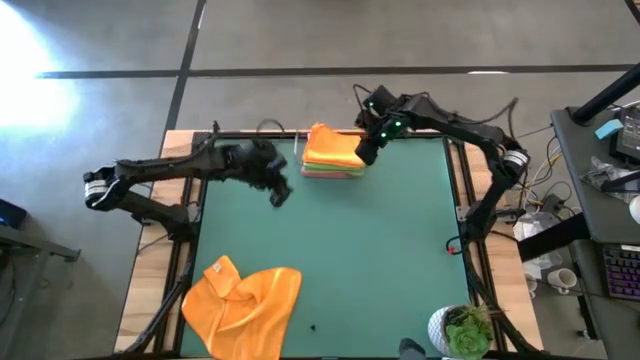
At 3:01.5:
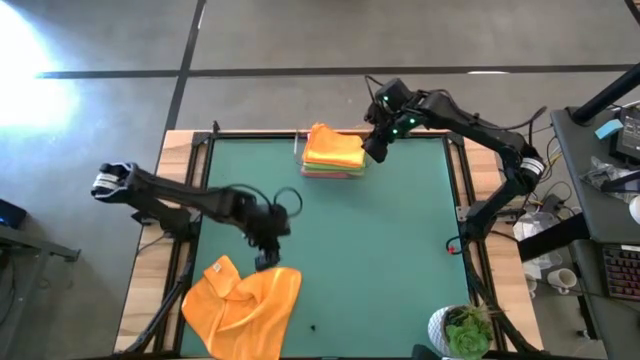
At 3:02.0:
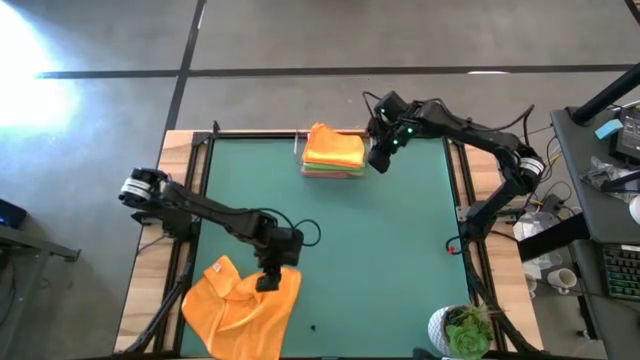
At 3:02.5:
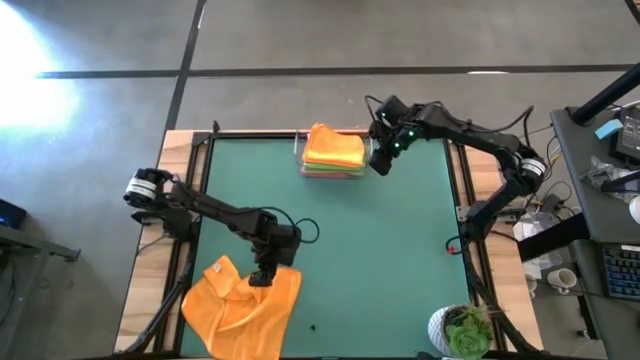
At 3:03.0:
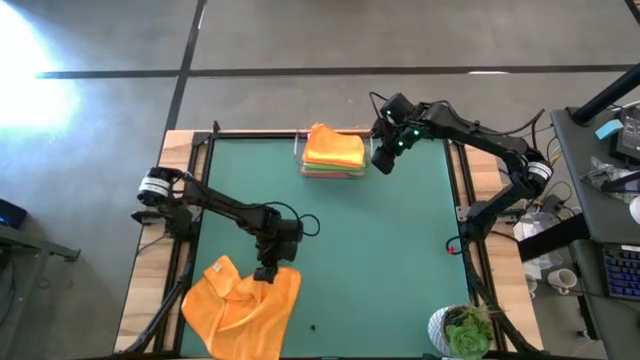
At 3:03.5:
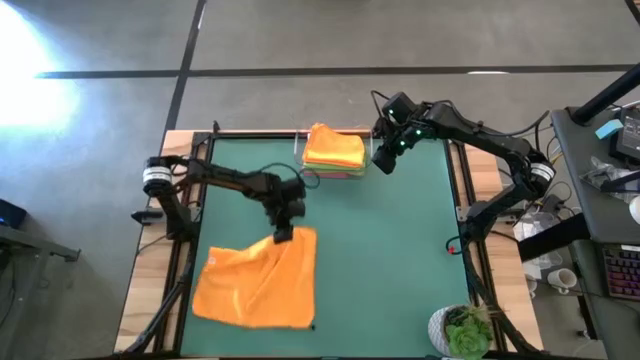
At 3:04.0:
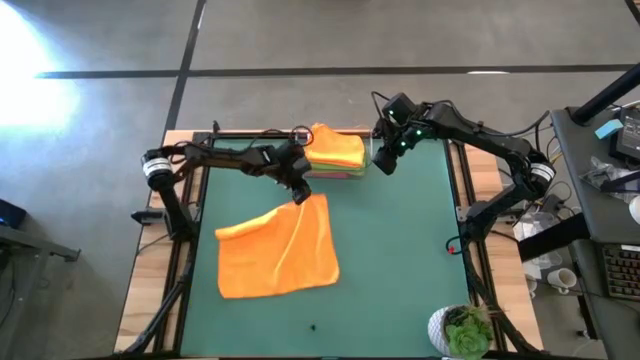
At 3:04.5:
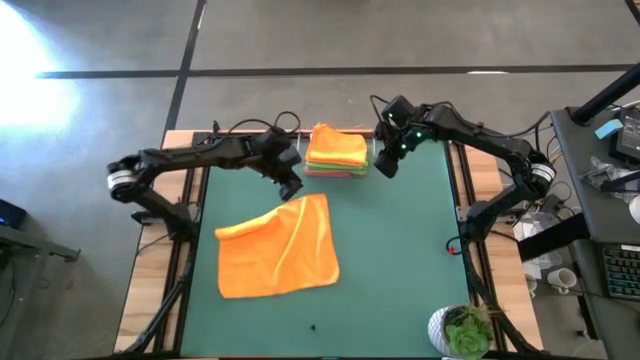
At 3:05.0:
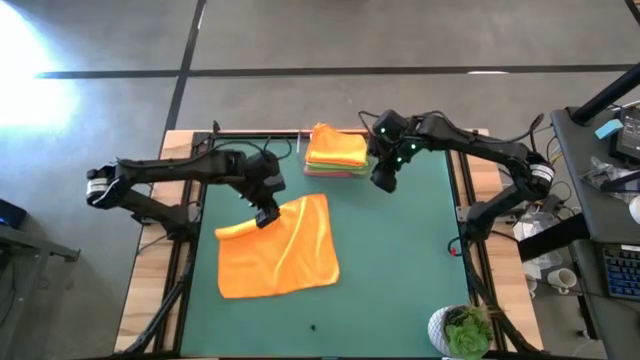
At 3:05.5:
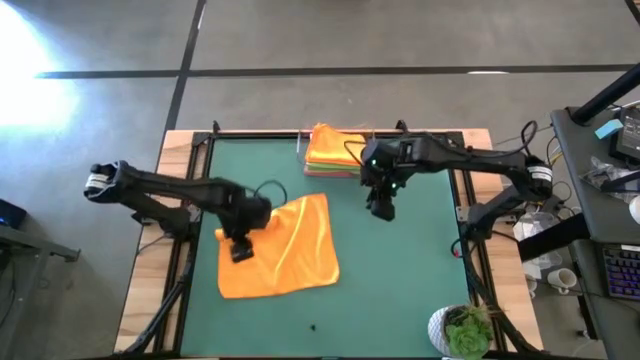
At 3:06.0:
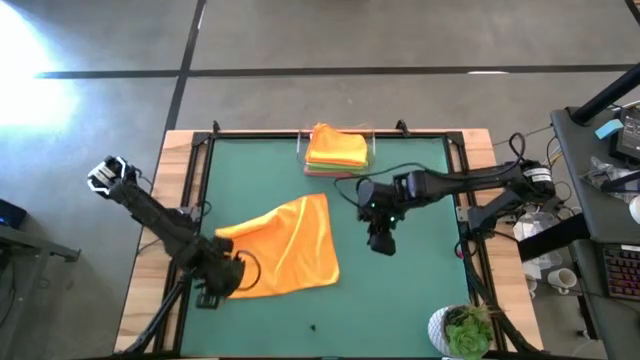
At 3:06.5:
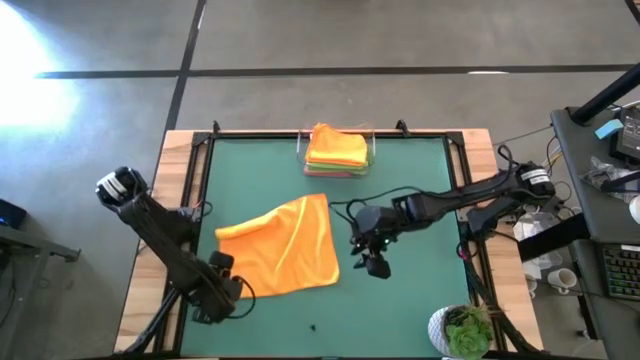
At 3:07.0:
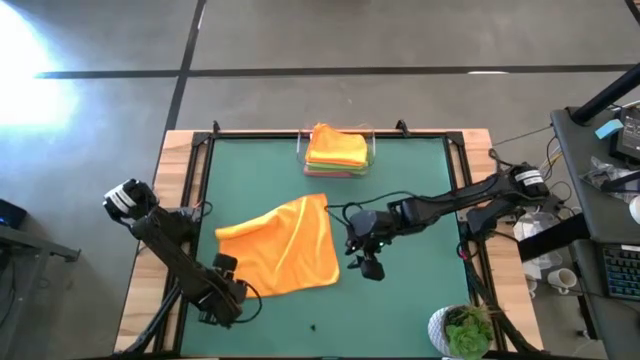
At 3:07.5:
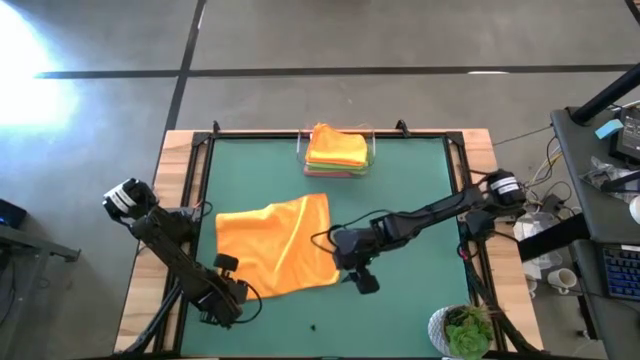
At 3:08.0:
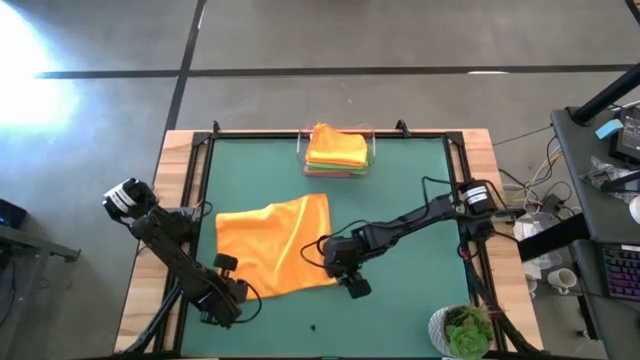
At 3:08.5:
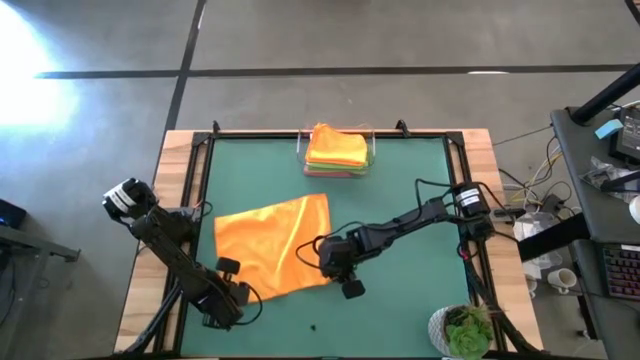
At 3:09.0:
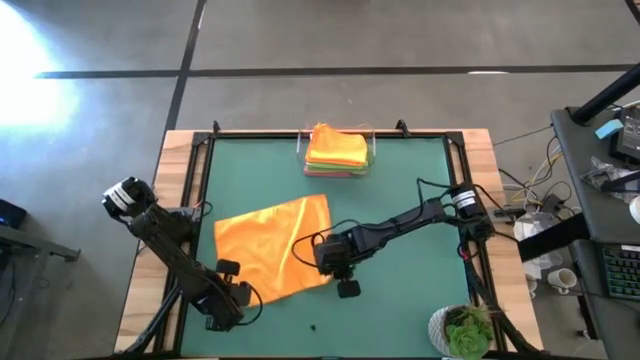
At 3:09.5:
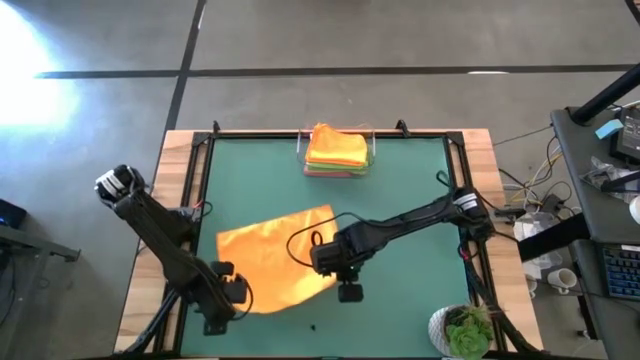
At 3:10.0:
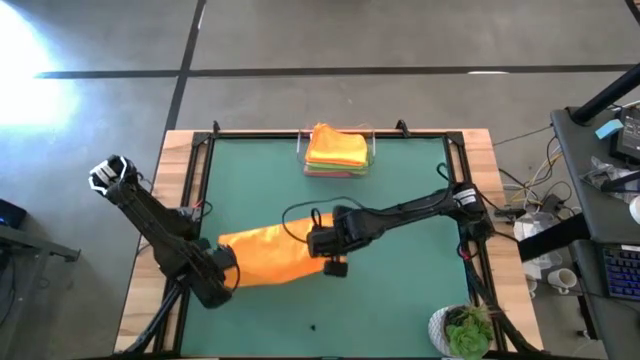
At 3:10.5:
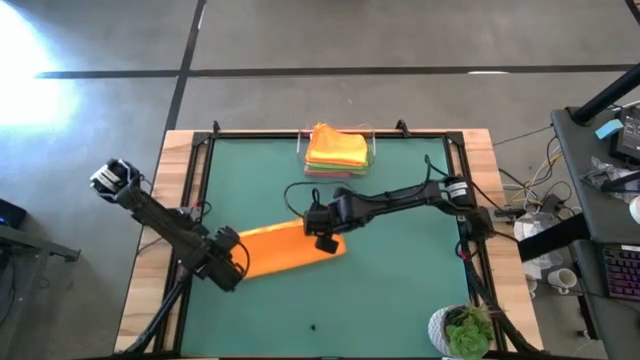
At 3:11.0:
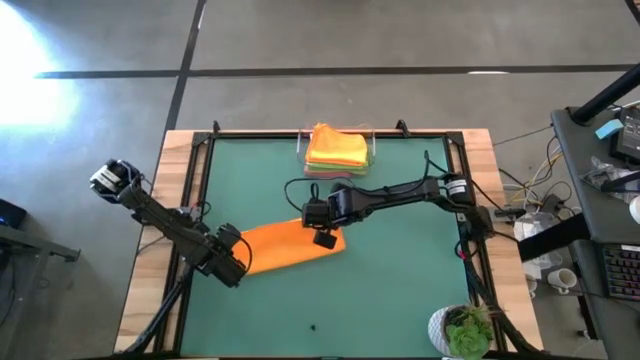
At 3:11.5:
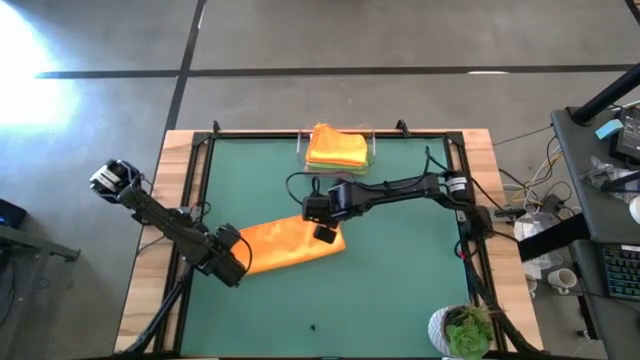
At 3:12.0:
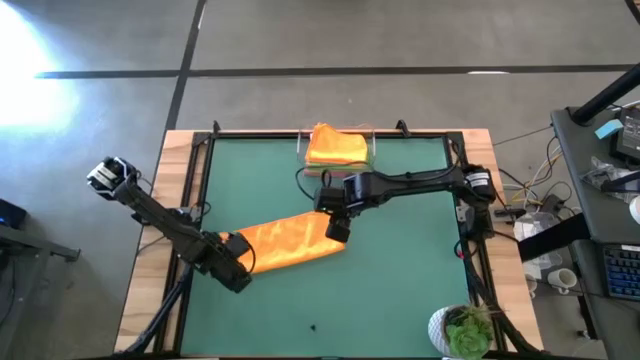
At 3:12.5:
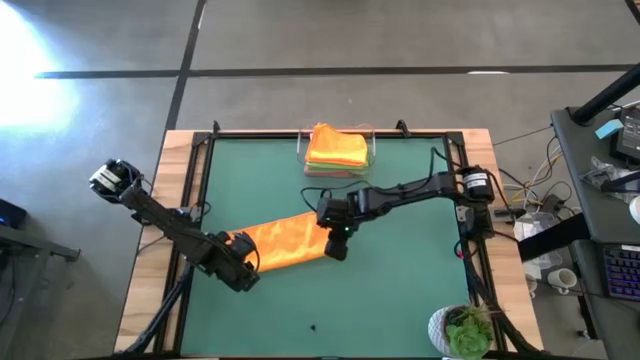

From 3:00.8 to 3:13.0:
Task: Fold microfiber towels
Fold the orange microfiber towel

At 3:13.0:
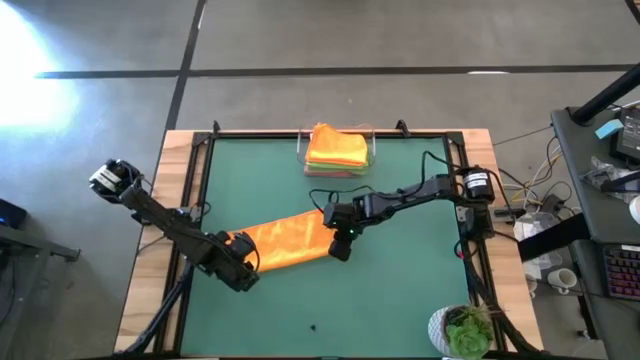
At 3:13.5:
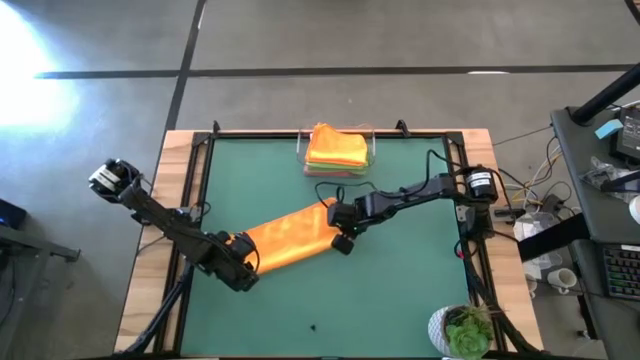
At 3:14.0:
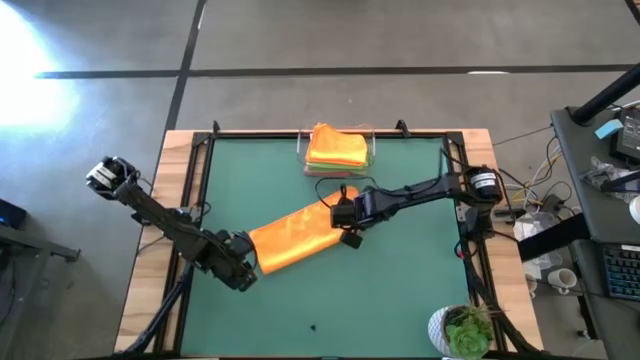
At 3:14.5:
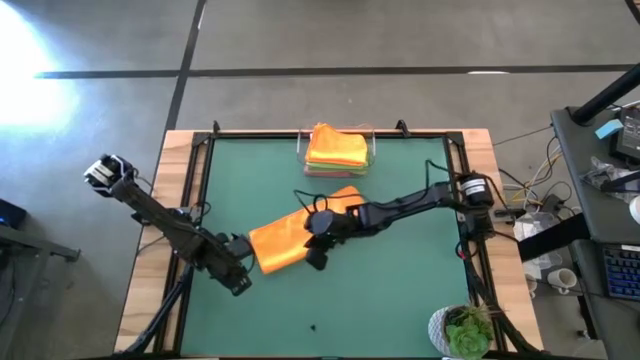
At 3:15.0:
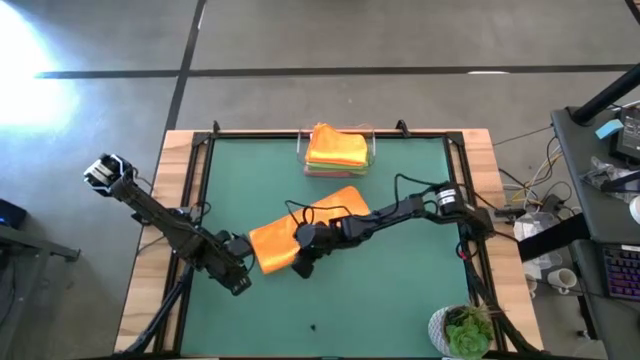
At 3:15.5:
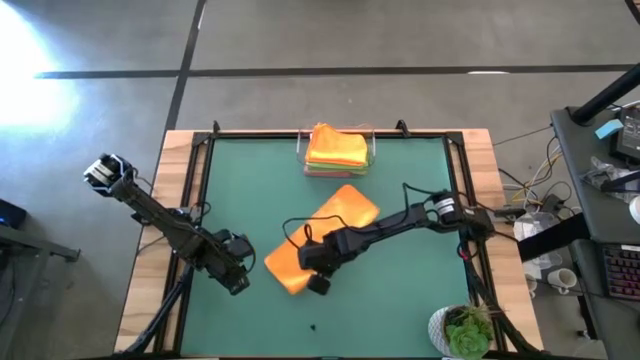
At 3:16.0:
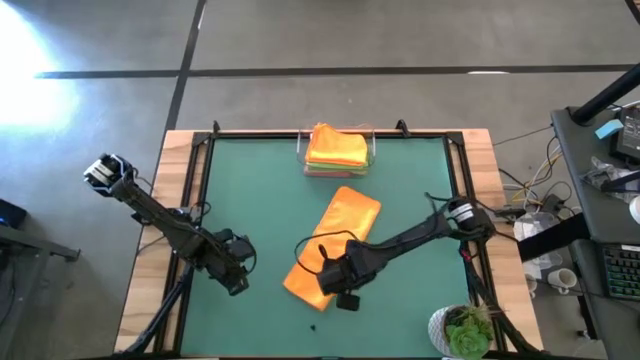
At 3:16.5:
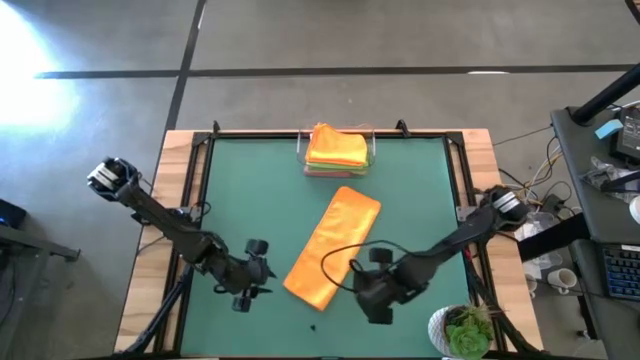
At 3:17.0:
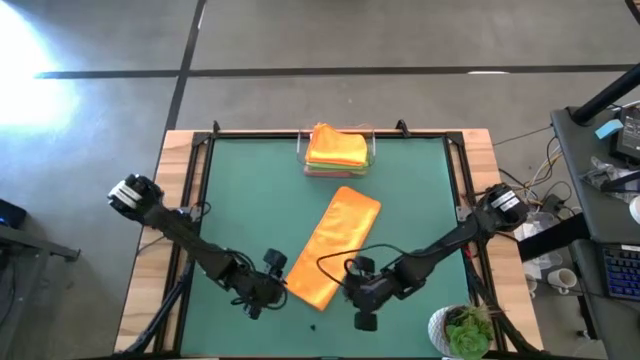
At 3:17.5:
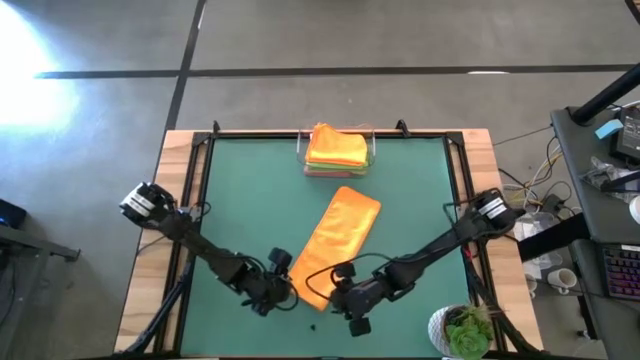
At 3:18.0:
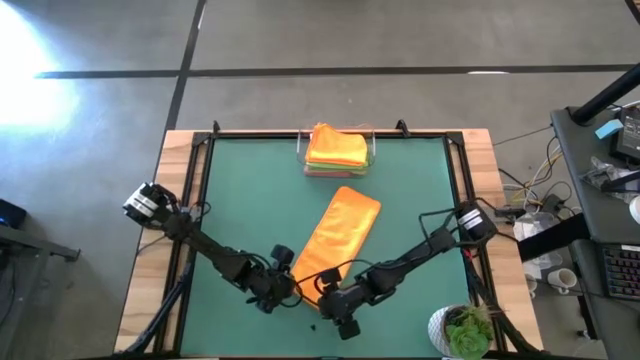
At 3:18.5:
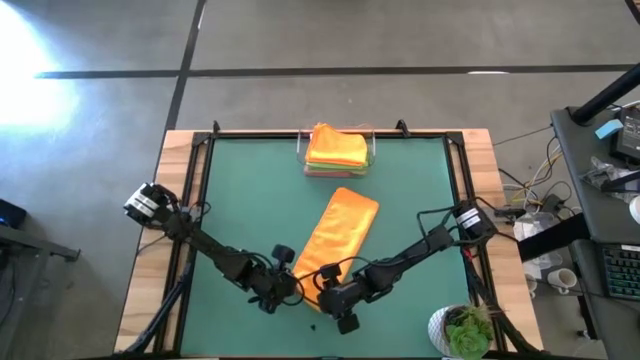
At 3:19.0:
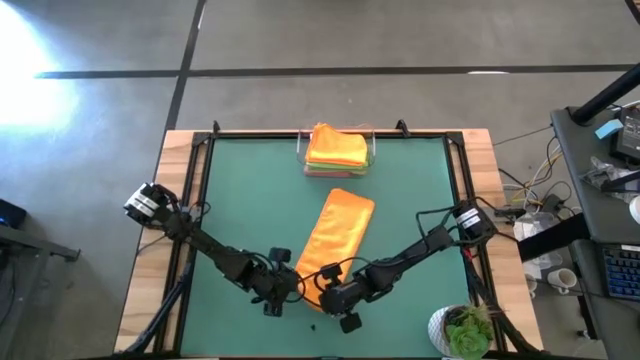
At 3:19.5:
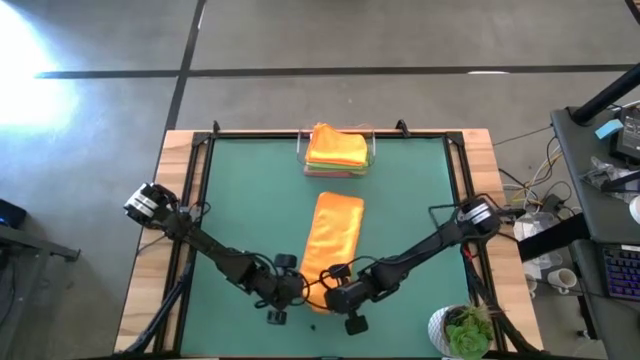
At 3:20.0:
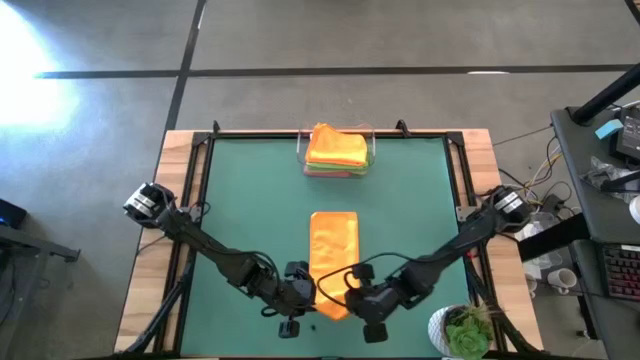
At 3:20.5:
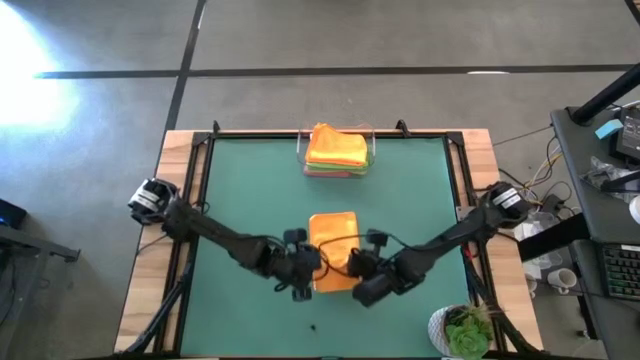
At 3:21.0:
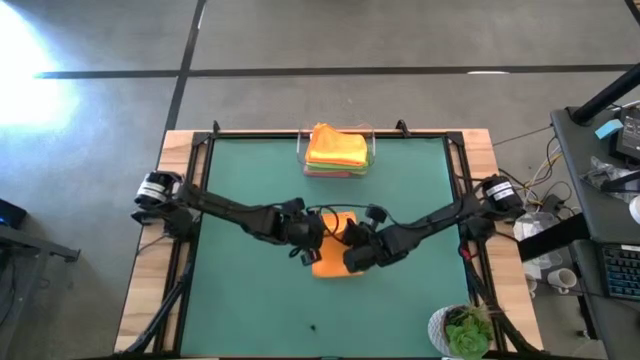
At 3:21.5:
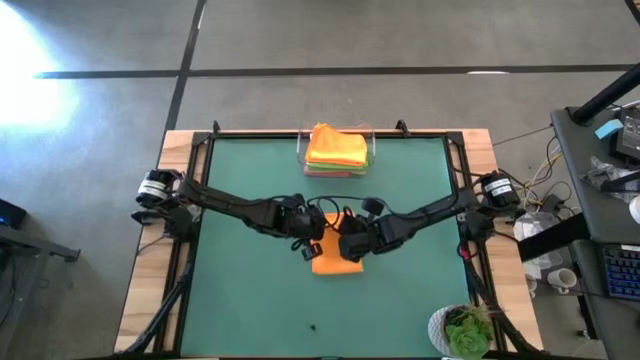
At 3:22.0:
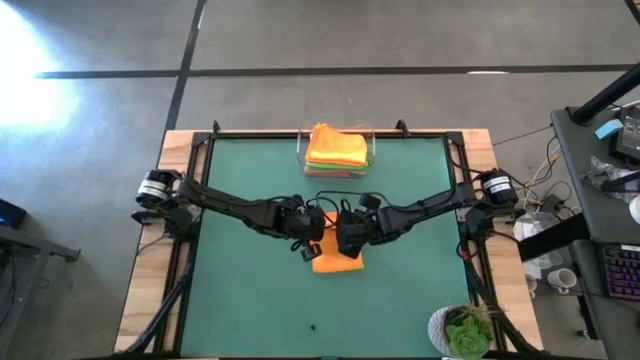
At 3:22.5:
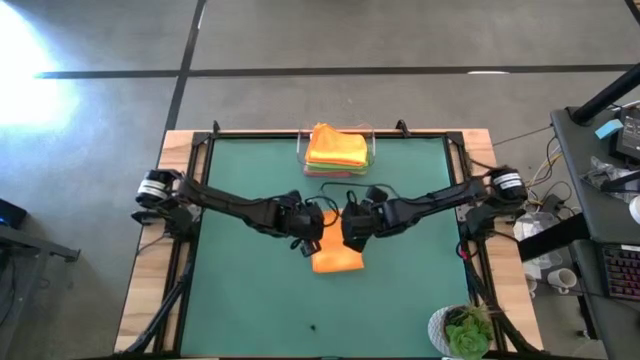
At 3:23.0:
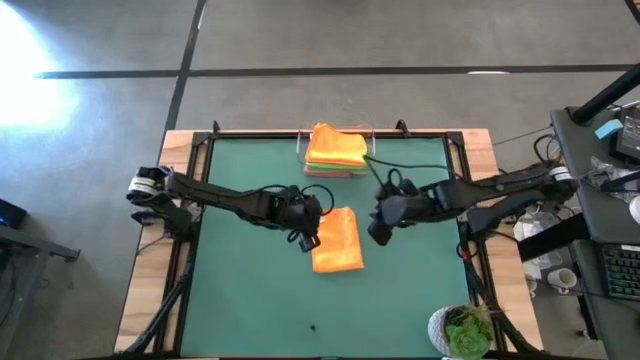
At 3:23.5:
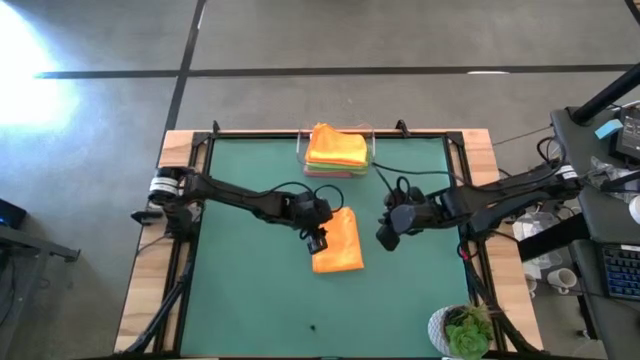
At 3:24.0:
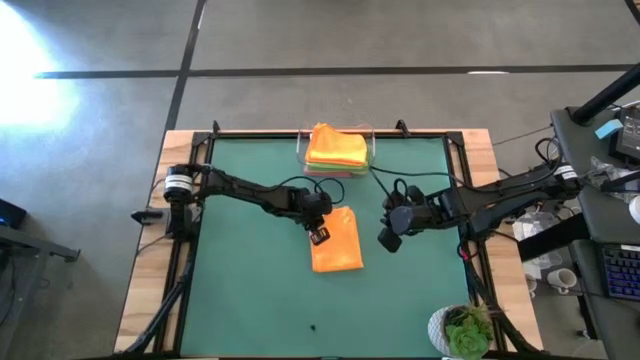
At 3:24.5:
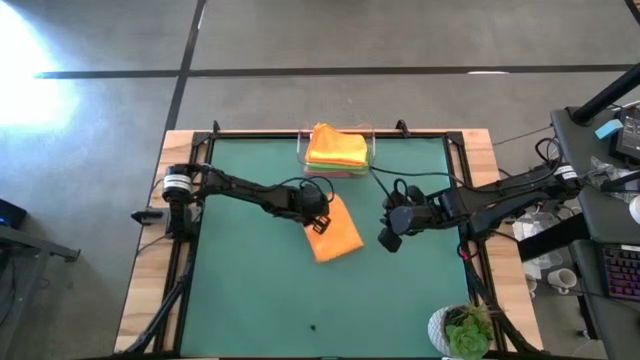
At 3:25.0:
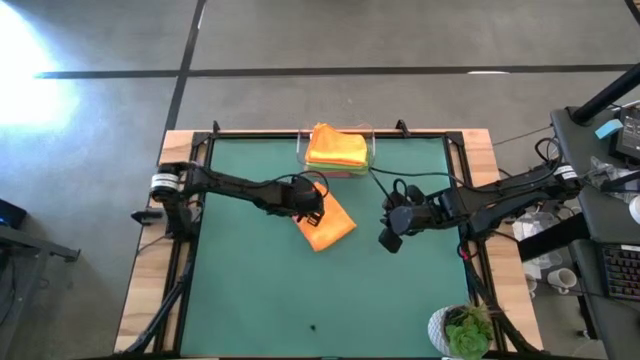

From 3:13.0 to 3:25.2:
Fold the orange microfiber towel
